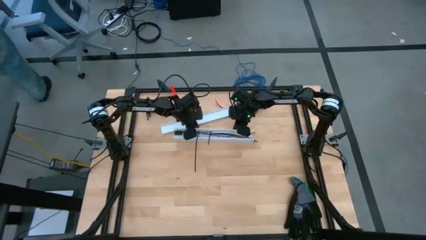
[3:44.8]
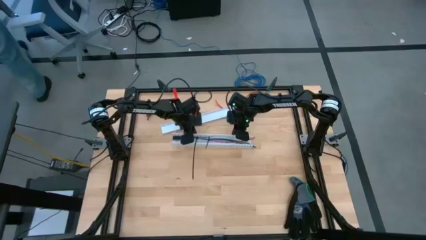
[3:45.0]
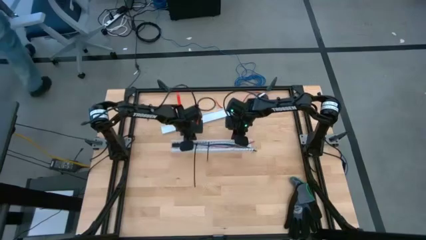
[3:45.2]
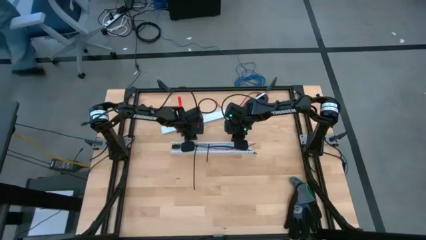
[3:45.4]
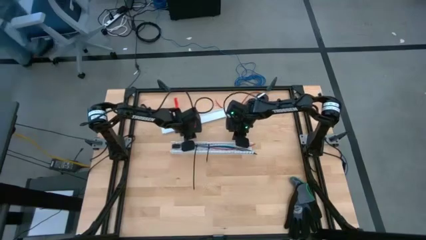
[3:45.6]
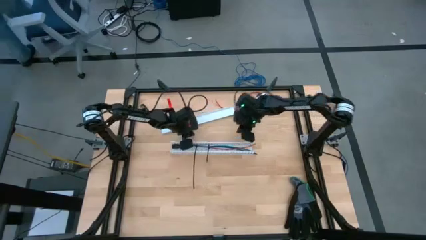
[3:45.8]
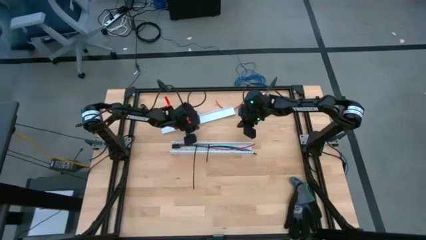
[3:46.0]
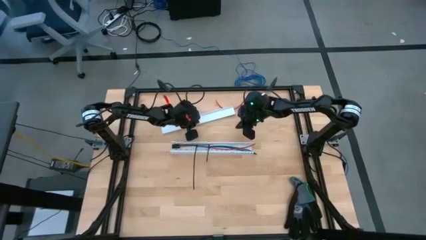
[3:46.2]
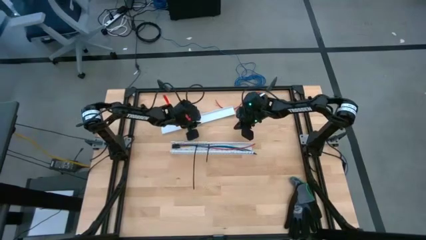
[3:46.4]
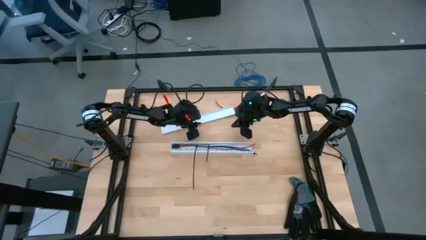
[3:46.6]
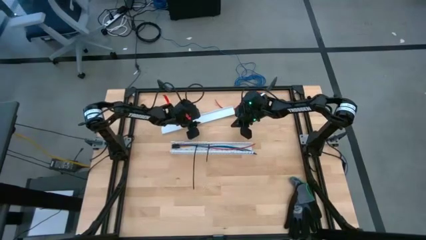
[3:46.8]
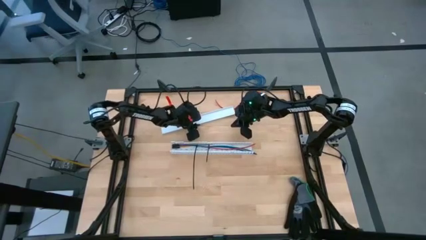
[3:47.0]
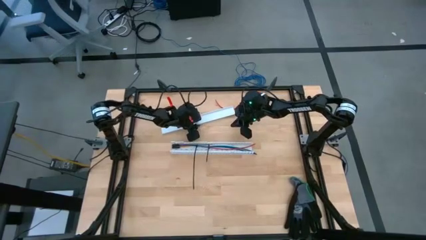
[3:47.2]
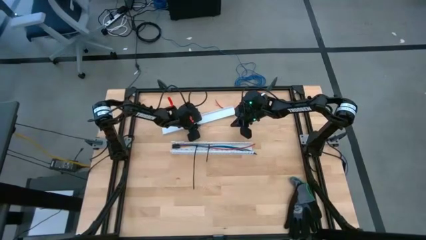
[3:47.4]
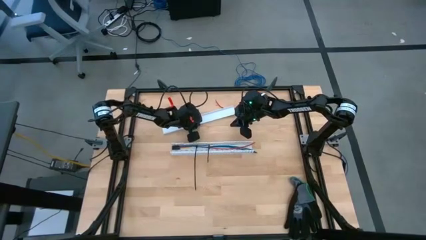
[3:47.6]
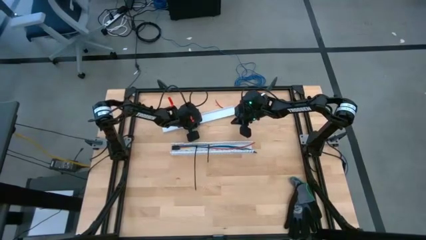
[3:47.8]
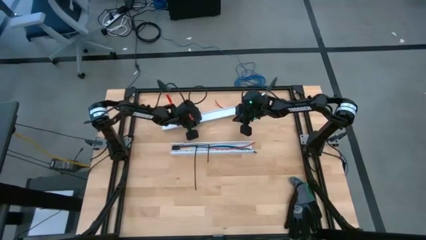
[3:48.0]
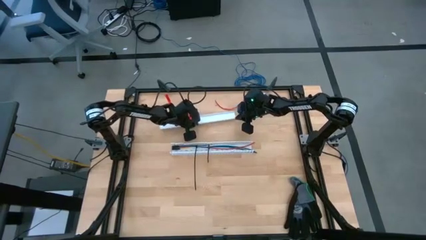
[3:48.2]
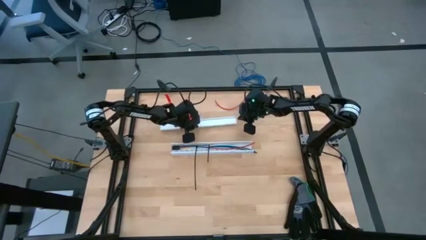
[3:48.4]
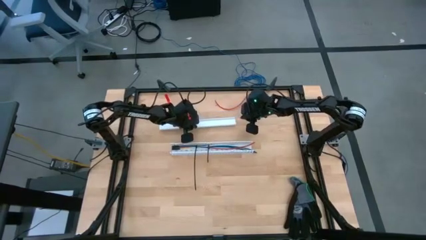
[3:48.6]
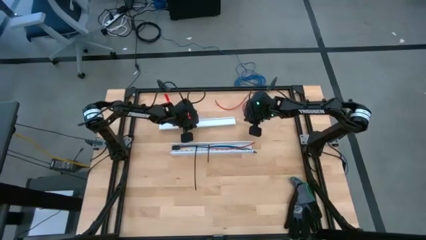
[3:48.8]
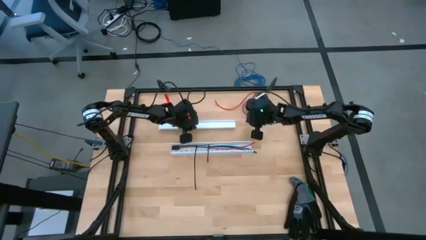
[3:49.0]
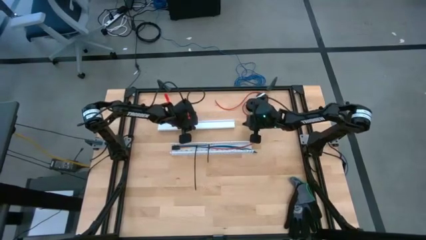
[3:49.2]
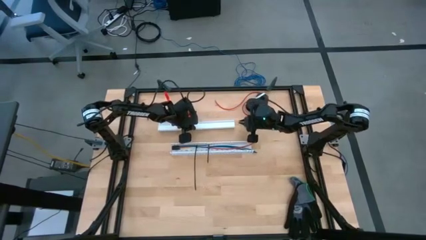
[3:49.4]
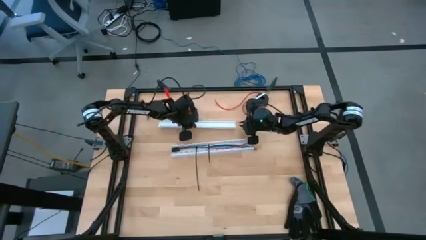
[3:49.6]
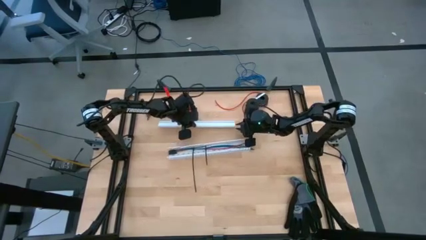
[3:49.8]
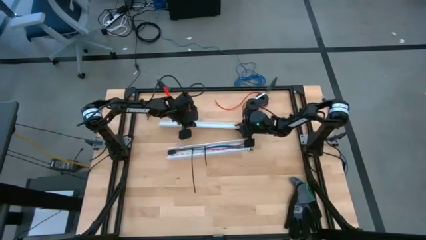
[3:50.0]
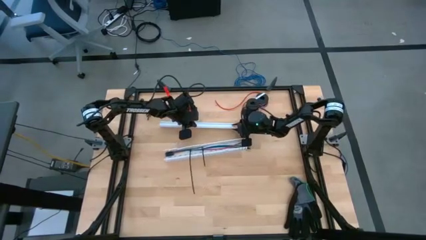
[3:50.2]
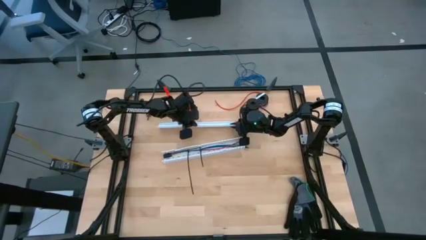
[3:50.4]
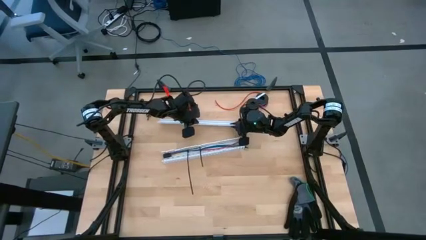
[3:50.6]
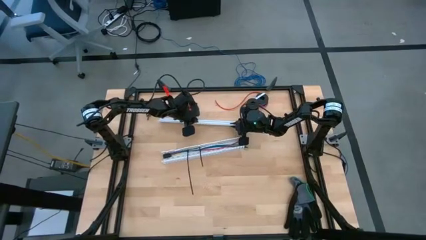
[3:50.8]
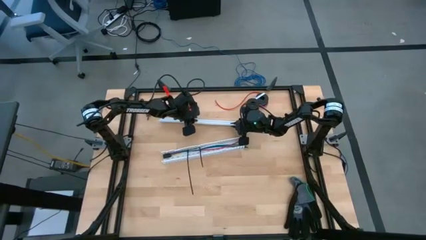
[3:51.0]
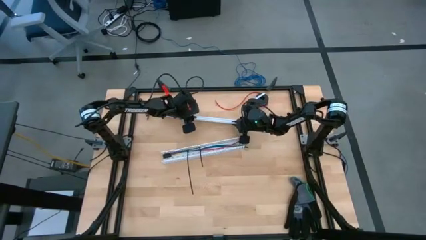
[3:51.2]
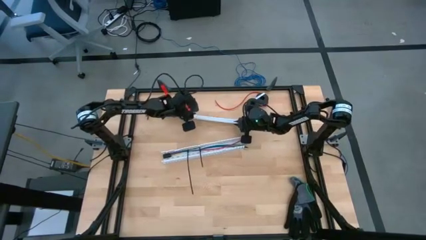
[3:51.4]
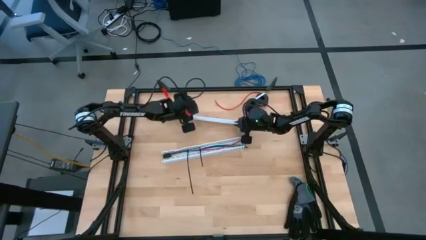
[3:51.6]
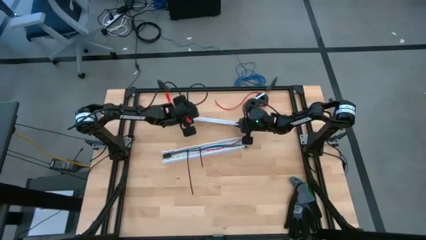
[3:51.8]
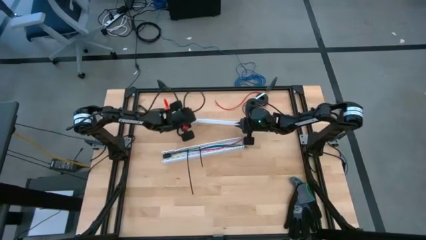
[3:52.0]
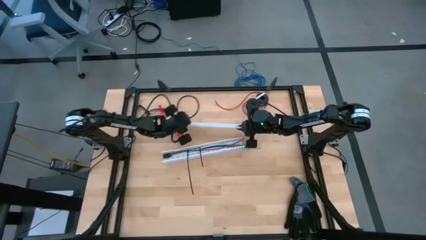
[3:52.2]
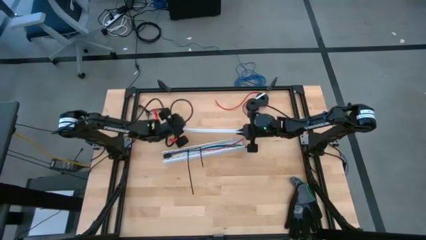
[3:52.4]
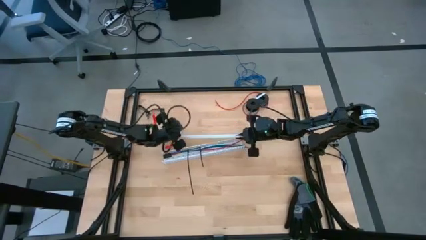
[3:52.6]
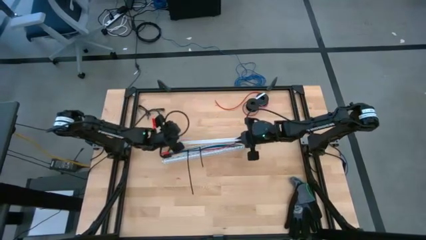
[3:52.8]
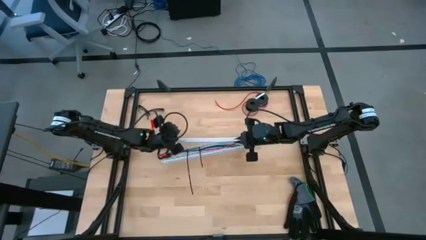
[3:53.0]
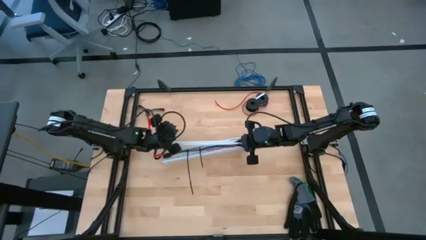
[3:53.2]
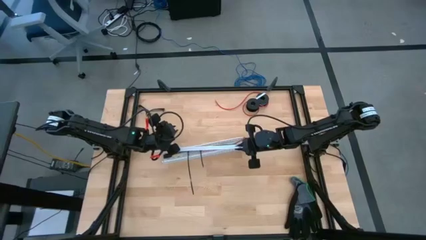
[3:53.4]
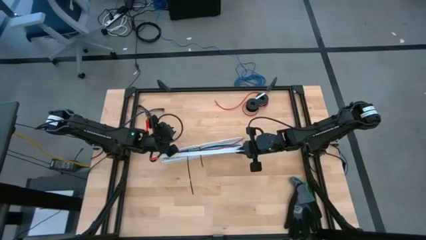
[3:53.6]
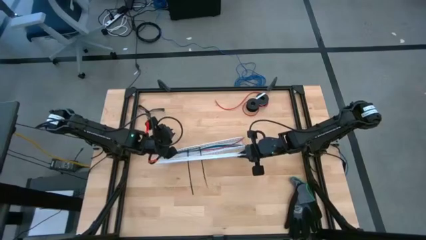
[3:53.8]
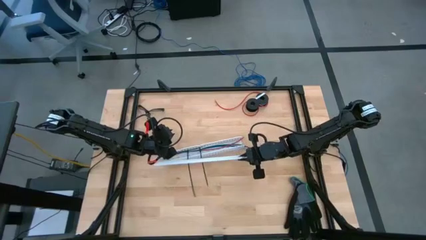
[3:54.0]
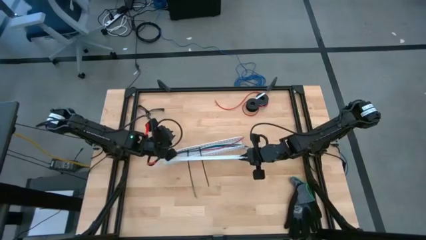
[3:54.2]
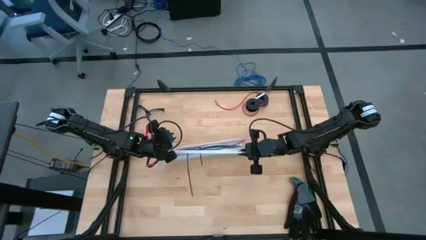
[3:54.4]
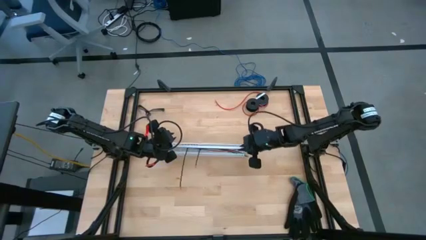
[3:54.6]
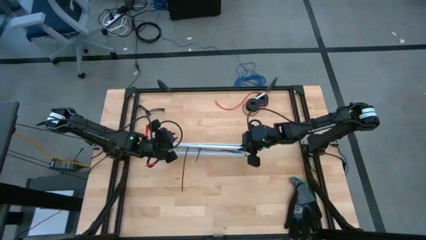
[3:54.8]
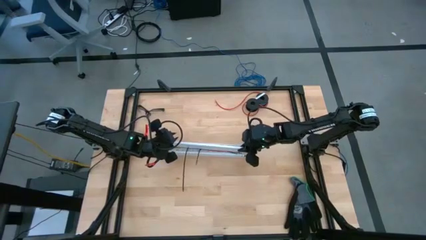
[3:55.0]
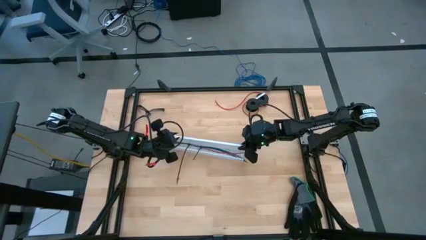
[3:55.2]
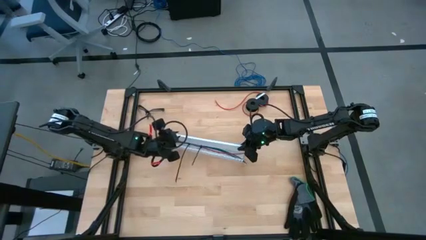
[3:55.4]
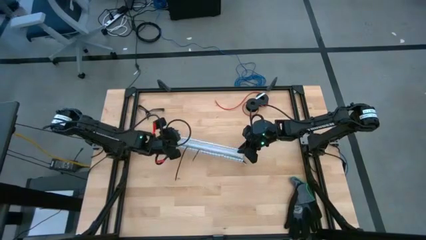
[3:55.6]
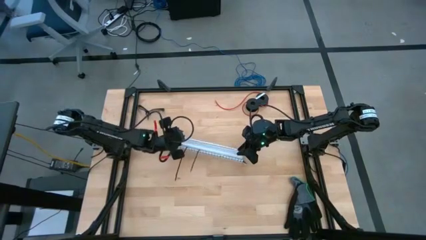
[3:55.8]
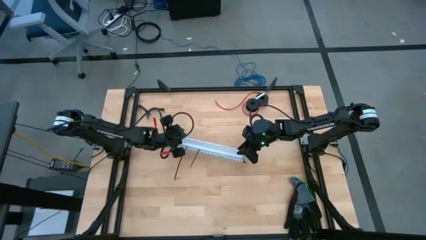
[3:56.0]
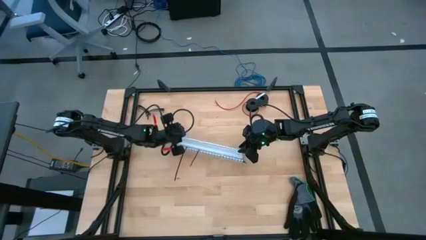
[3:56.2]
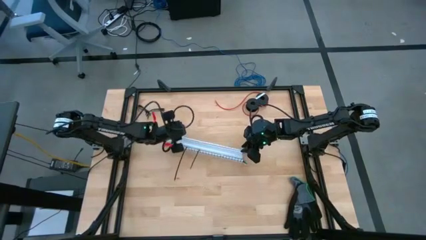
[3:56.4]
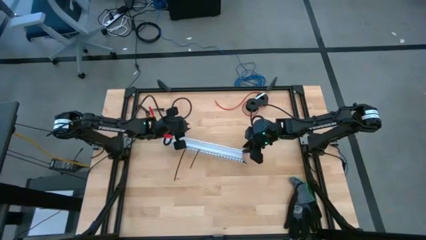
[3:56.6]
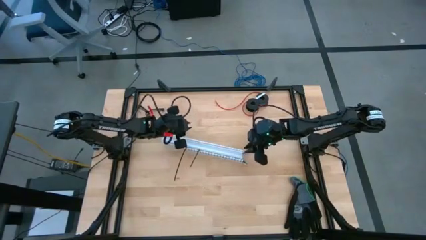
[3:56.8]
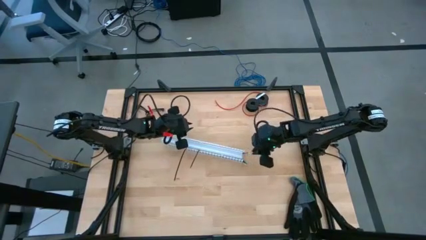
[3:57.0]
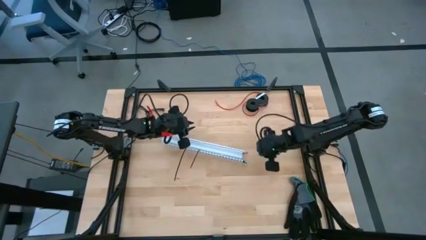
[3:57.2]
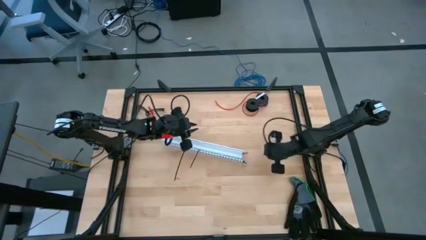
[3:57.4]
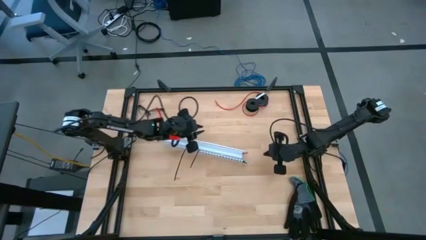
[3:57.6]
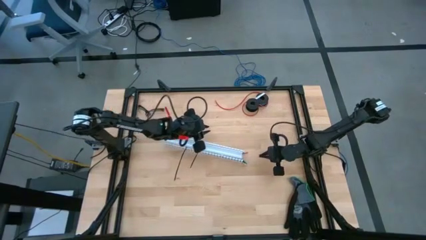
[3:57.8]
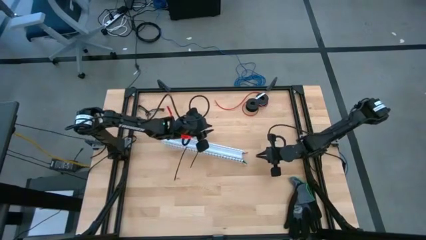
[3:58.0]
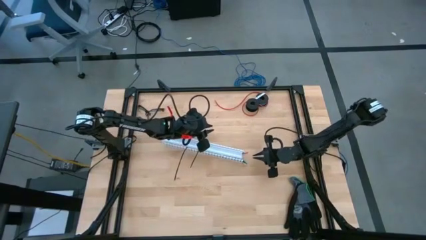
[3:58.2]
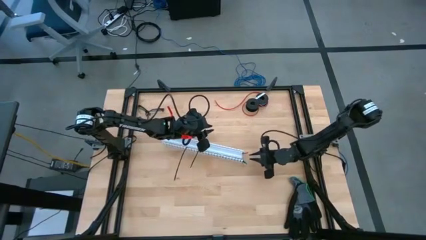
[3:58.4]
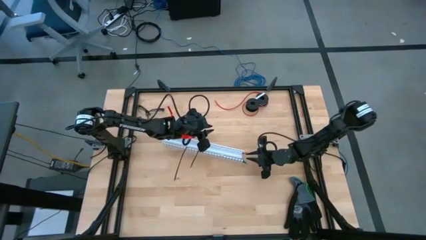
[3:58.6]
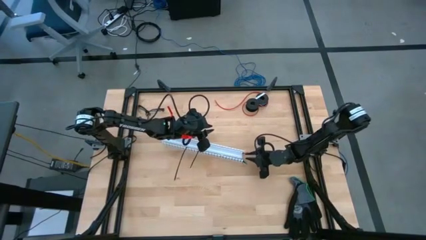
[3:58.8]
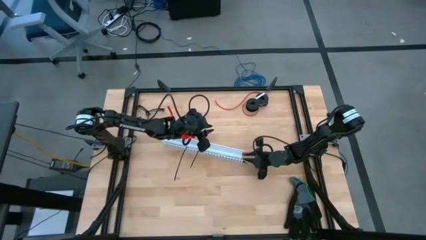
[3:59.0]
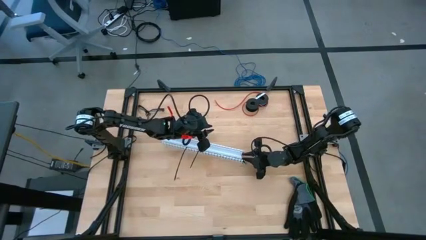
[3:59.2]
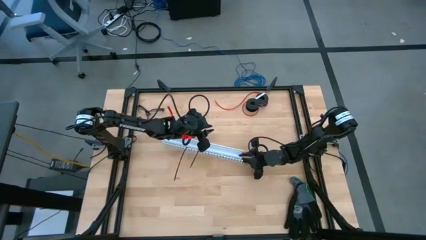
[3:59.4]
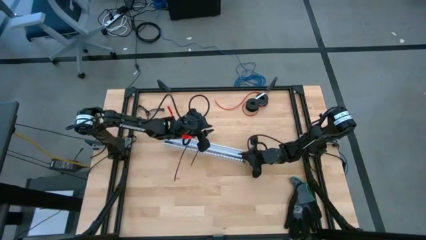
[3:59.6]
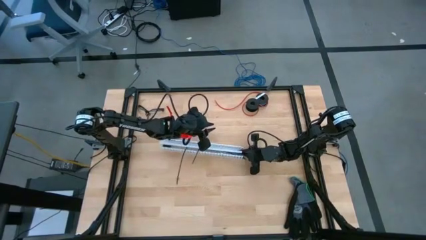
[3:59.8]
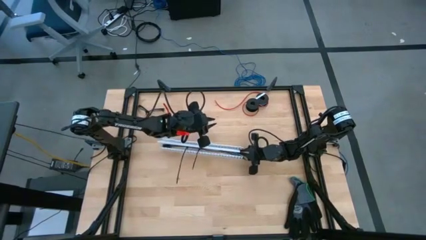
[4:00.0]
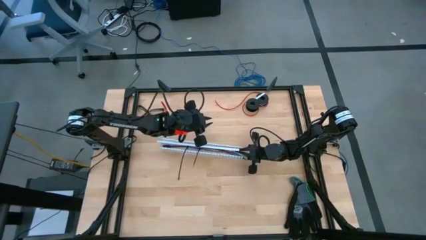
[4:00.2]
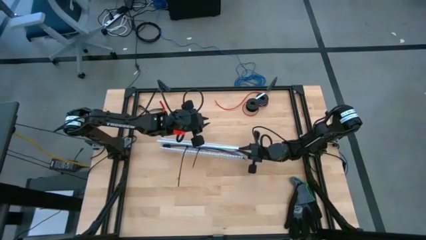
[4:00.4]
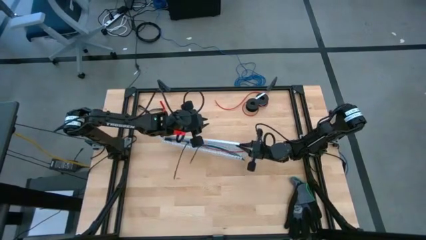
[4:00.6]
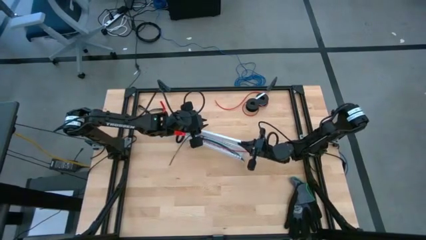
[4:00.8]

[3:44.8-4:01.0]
Task: Ziptie cables
Close the white cable duct
